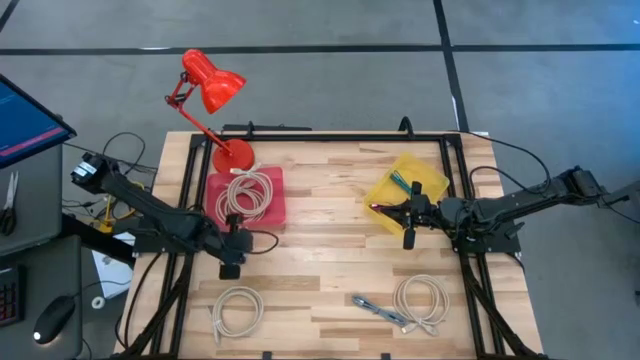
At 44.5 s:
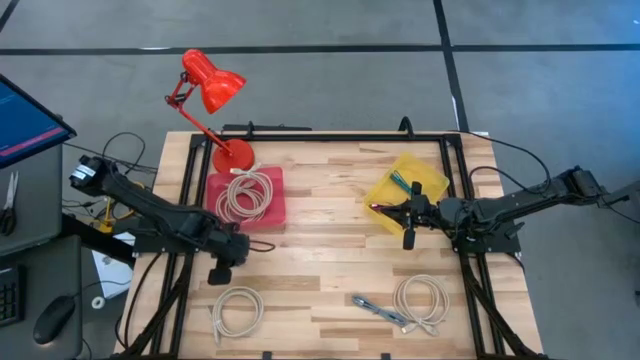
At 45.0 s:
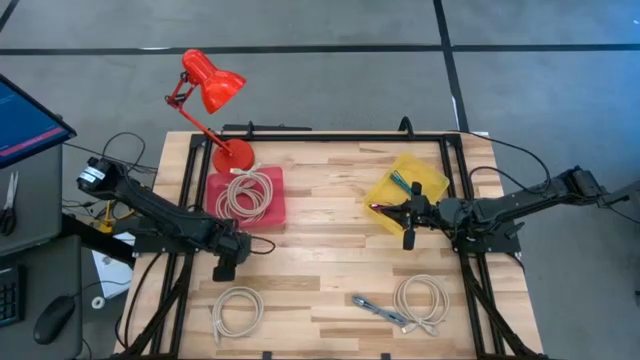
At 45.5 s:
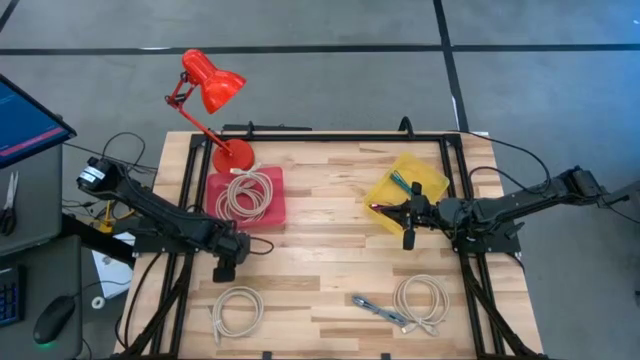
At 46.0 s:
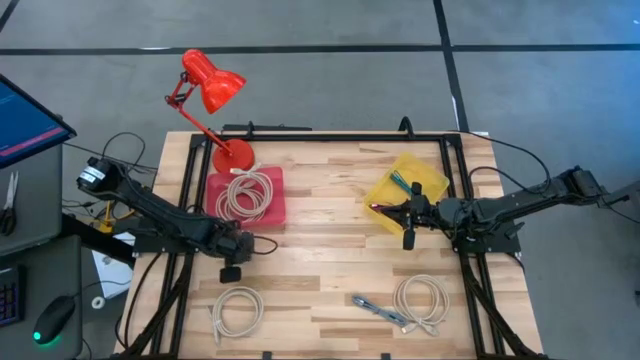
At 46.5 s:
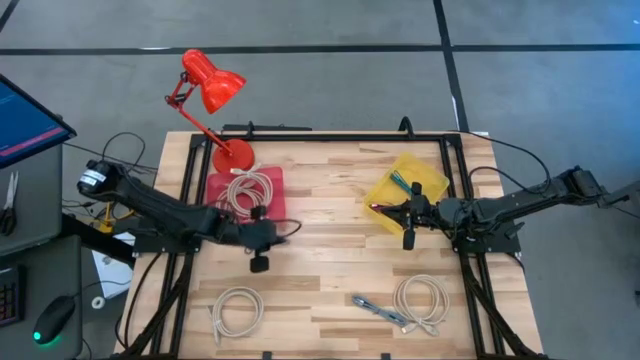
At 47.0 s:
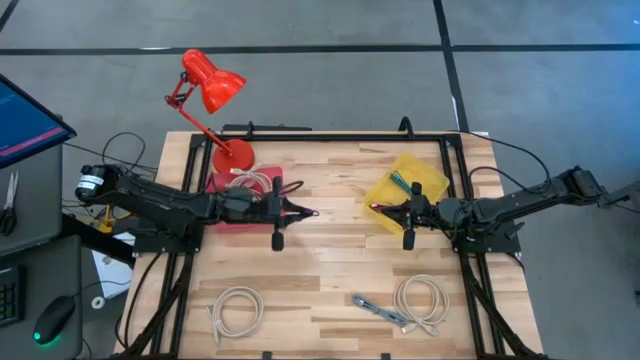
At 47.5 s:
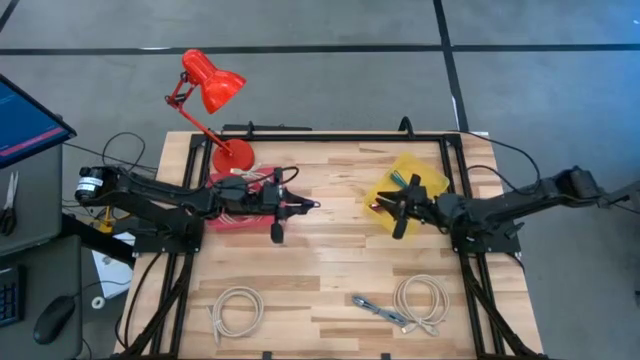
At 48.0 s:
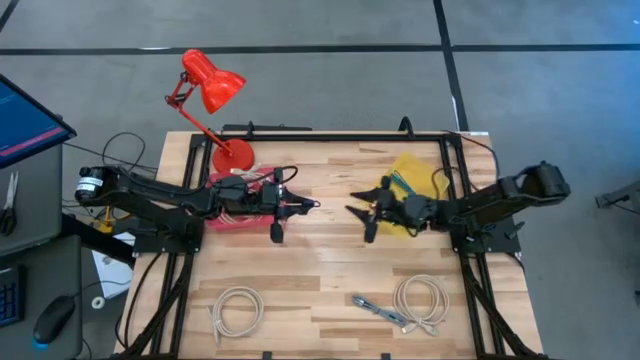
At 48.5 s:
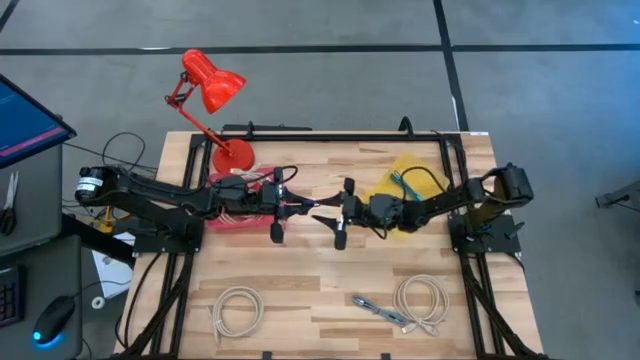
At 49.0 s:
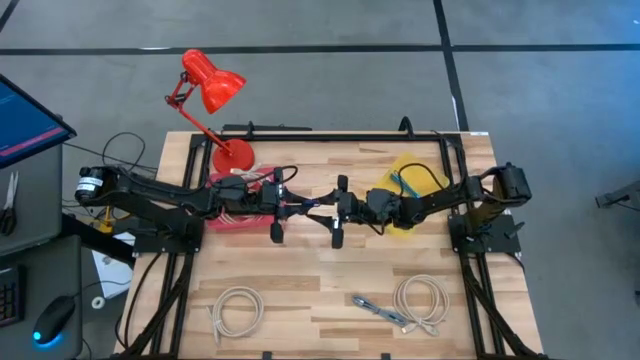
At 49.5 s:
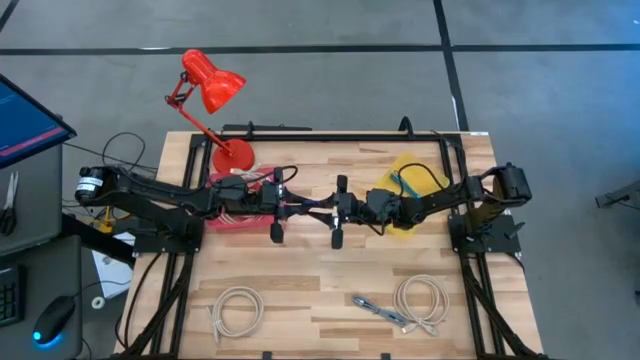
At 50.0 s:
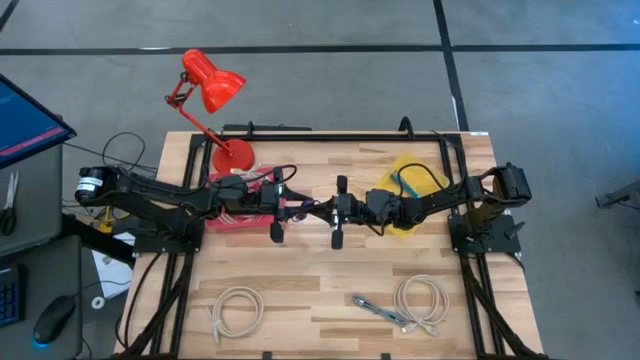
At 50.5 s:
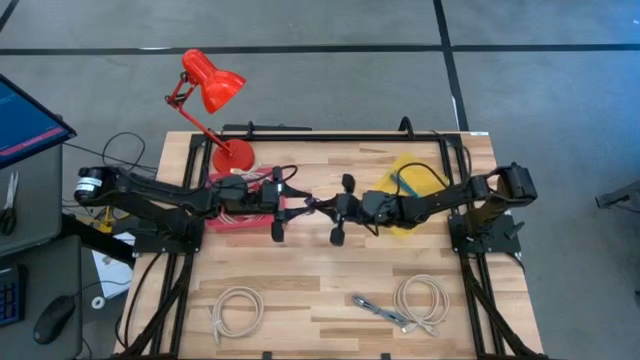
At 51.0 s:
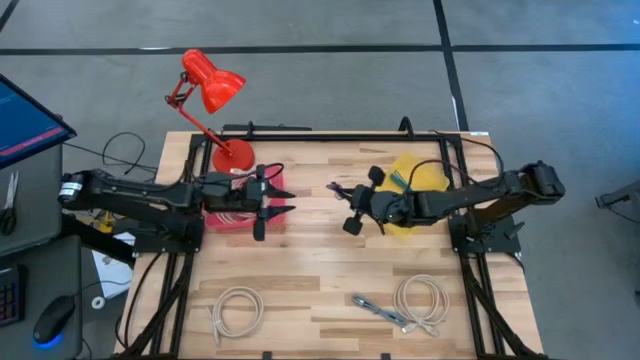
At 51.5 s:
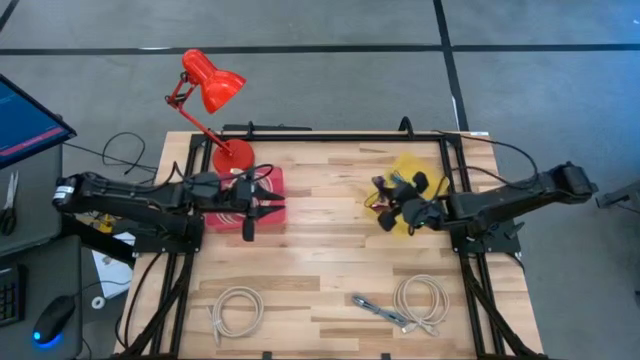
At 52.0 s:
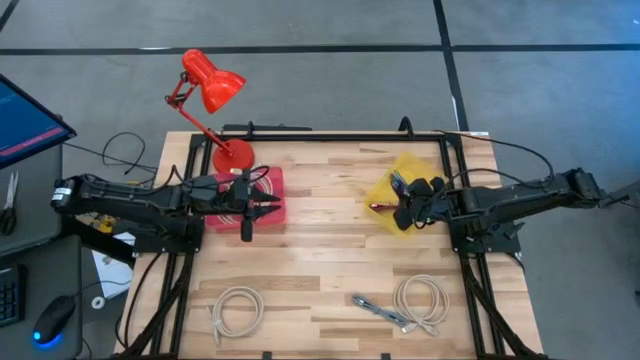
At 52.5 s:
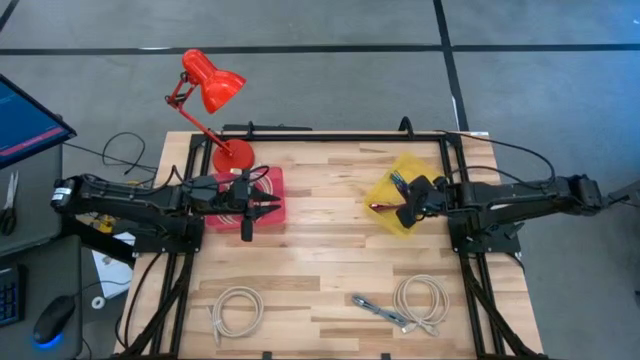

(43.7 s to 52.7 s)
Task: Pick & Place USB Port
Put the purple USB cable into the yellow bin

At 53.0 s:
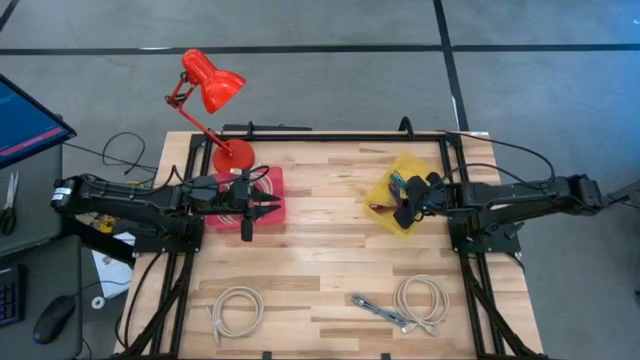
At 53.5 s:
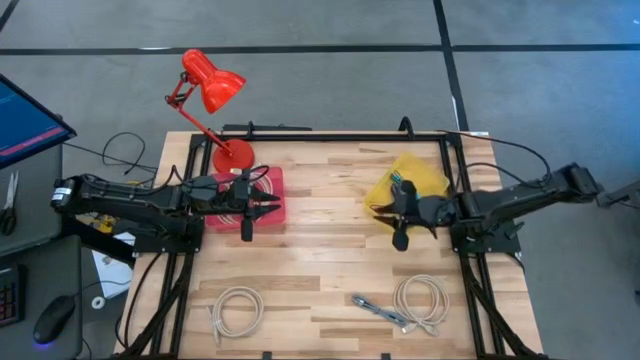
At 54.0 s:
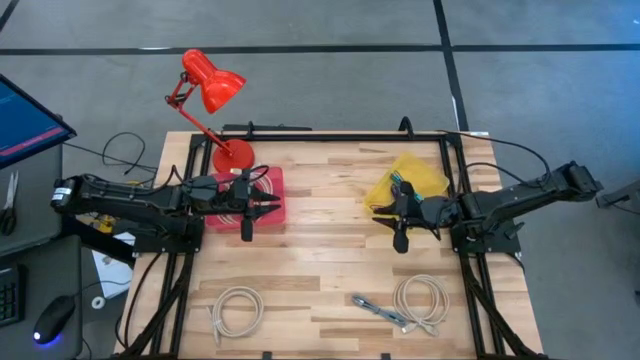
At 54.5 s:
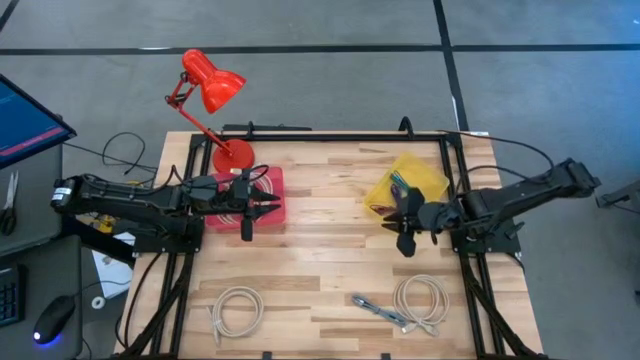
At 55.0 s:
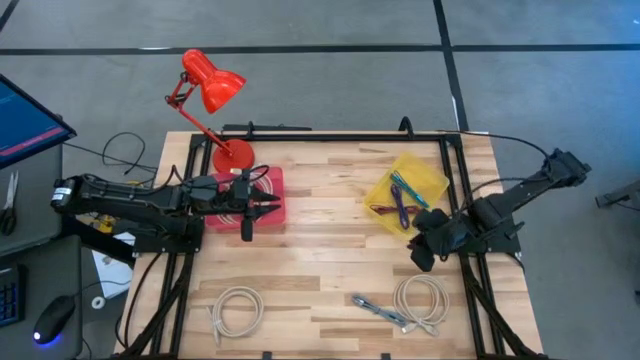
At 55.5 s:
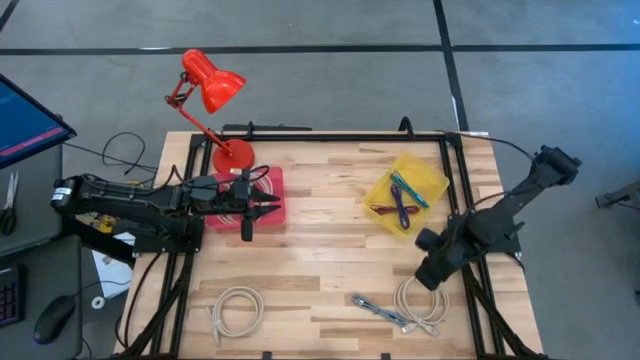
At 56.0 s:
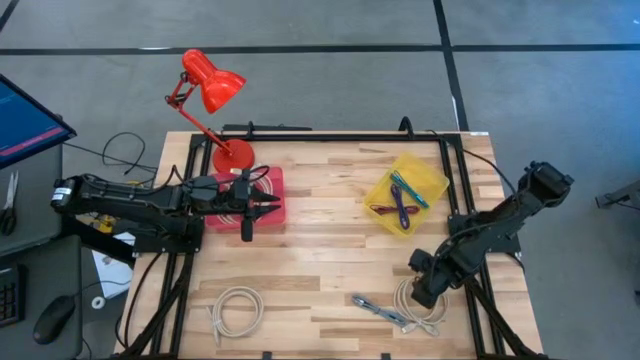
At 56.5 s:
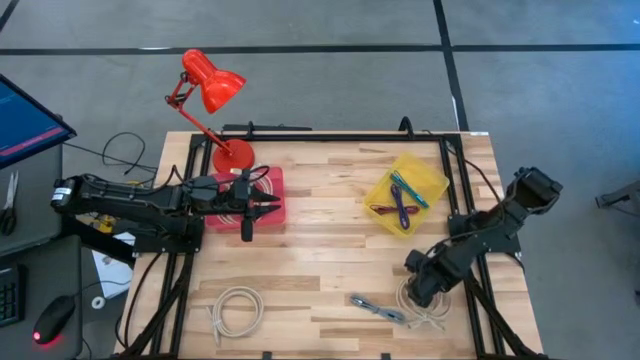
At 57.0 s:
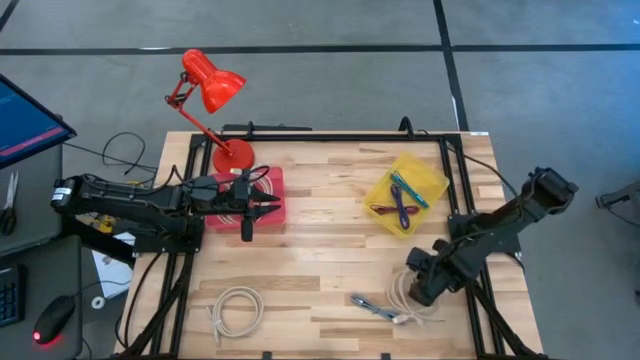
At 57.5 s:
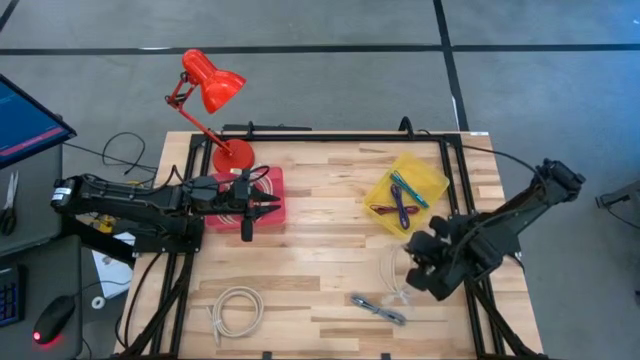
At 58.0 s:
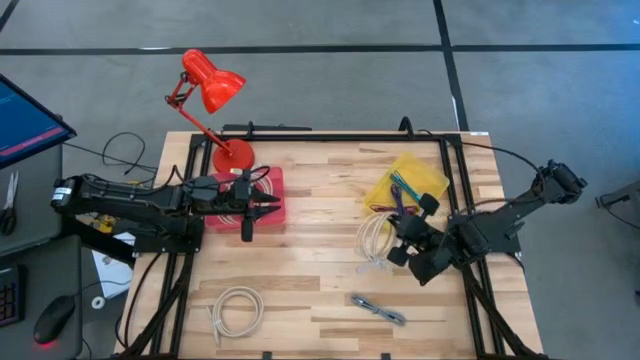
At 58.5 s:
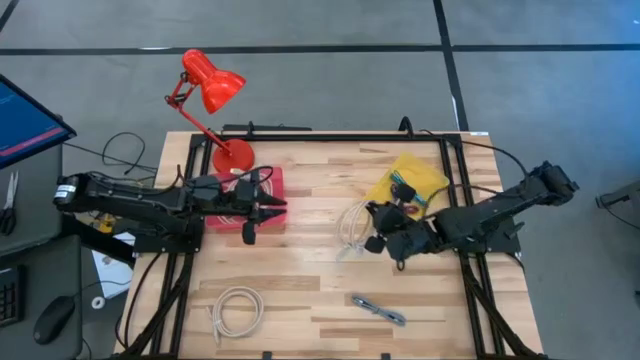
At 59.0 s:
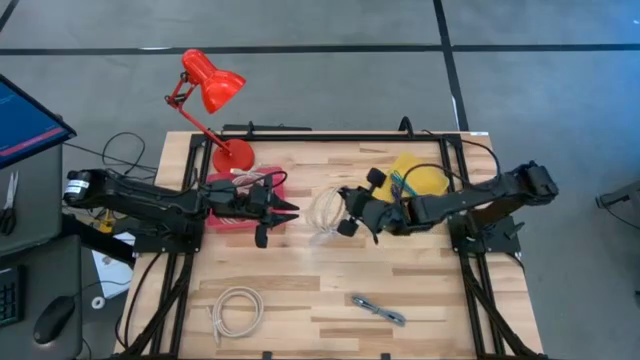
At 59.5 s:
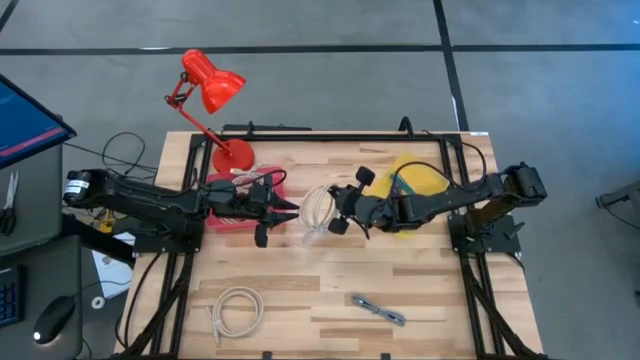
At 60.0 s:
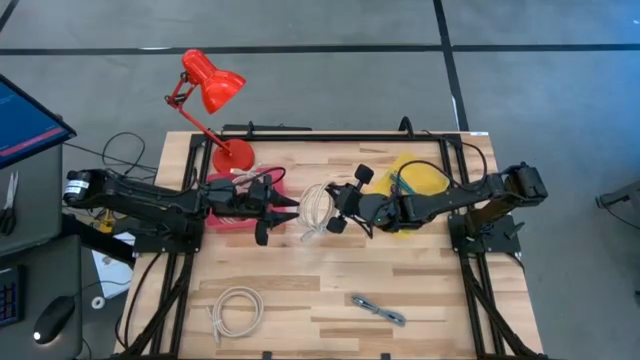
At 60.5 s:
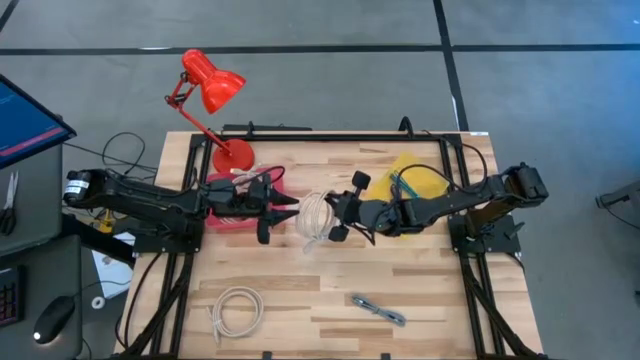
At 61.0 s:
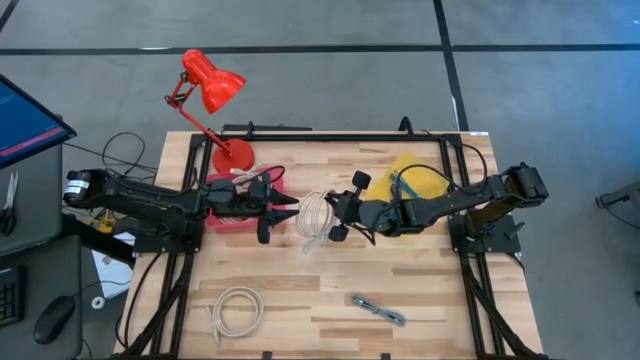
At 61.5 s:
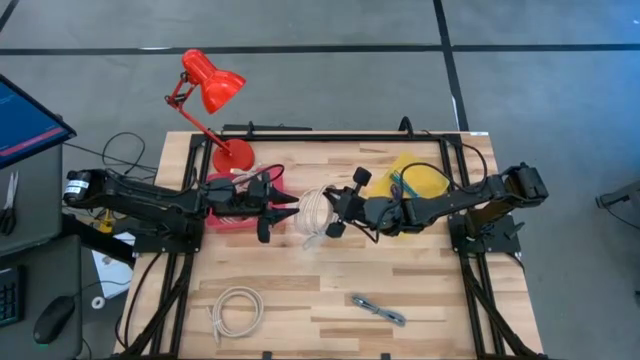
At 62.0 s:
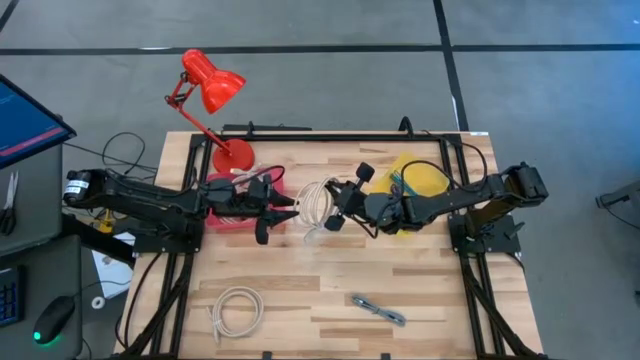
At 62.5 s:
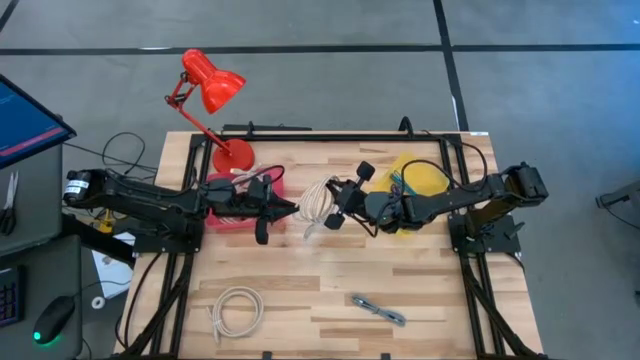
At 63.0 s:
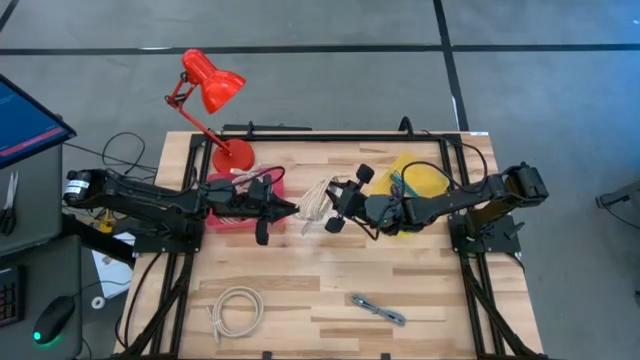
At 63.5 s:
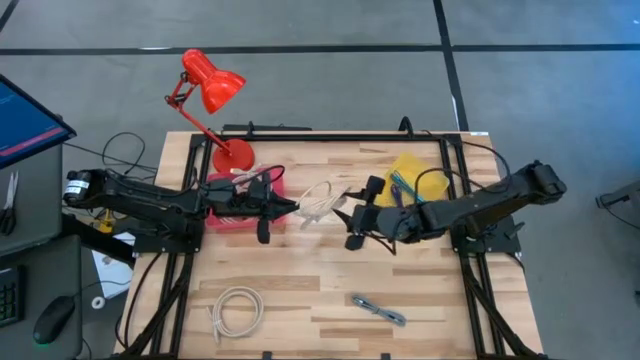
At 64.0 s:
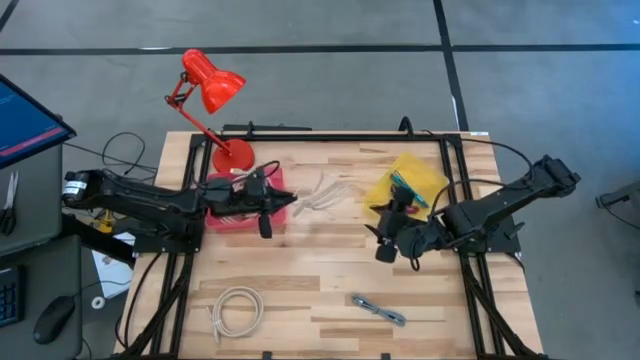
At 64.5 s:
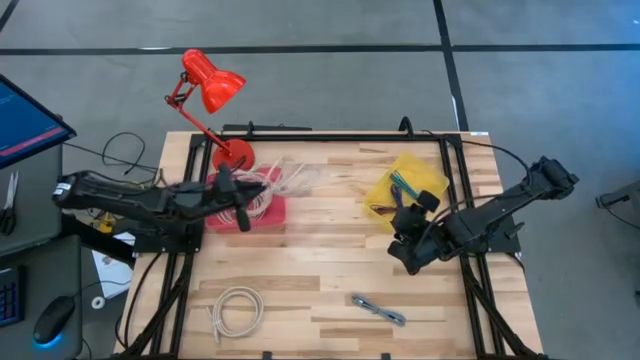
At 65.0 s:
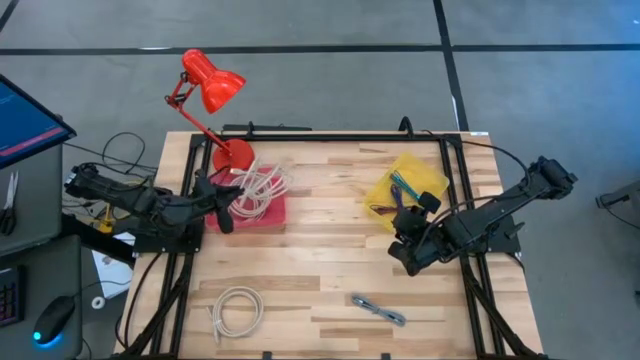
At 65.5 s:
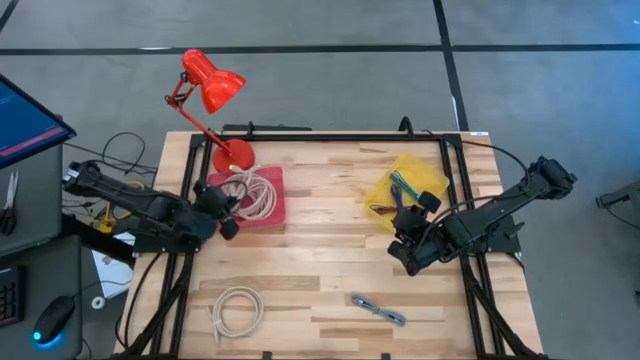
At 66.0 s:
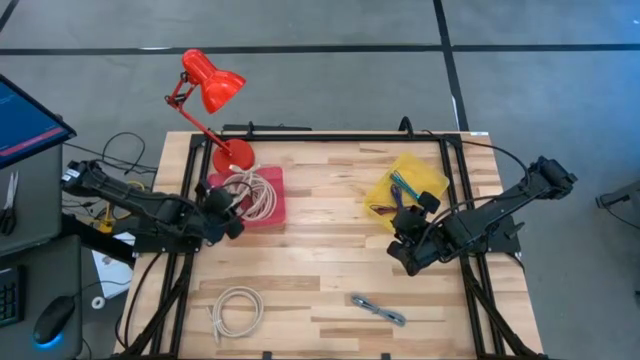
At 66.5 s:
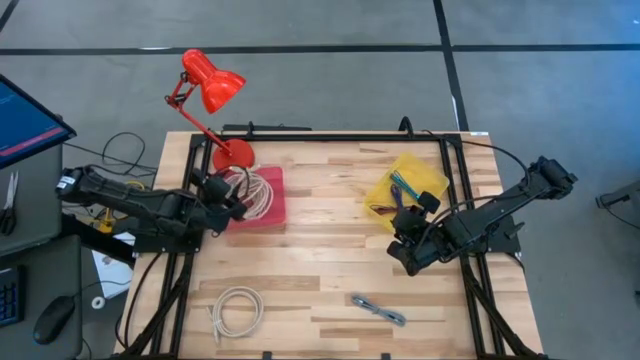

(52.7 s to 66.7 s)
Put the brown USB cable into the pink bin
